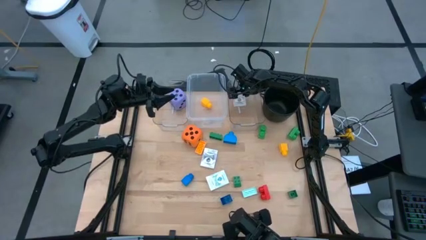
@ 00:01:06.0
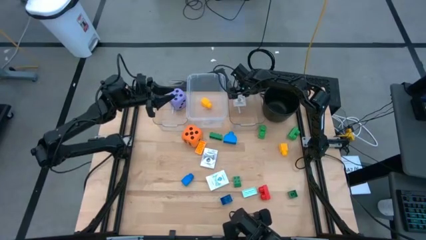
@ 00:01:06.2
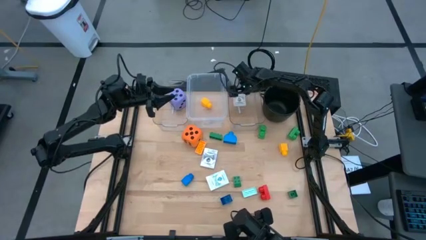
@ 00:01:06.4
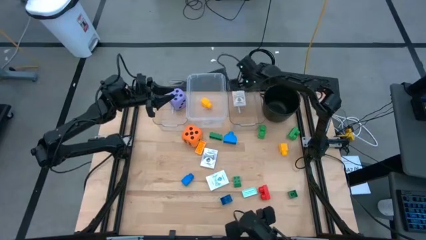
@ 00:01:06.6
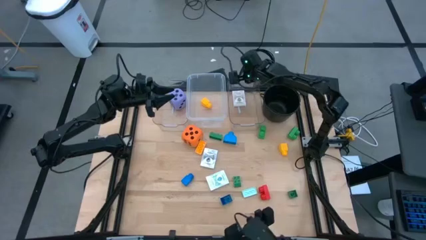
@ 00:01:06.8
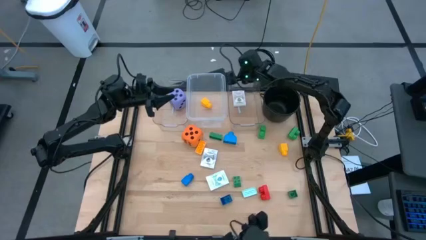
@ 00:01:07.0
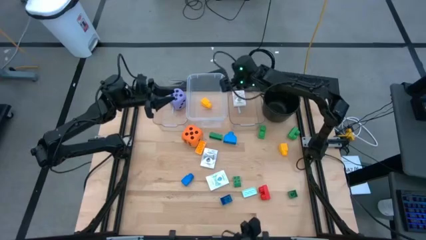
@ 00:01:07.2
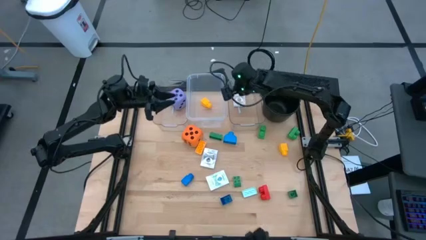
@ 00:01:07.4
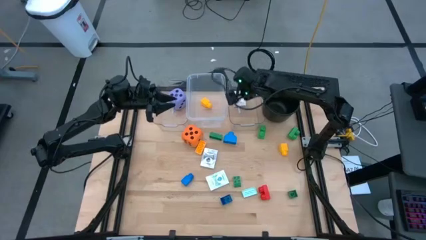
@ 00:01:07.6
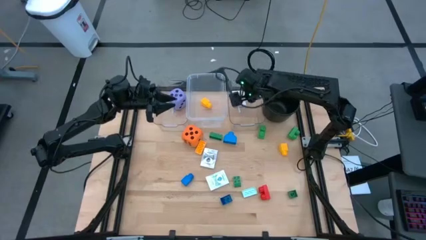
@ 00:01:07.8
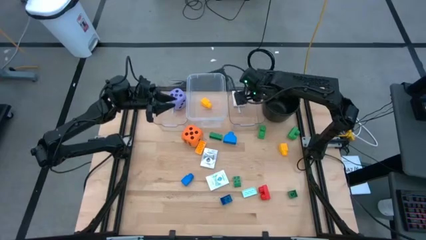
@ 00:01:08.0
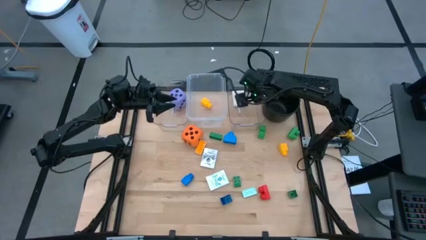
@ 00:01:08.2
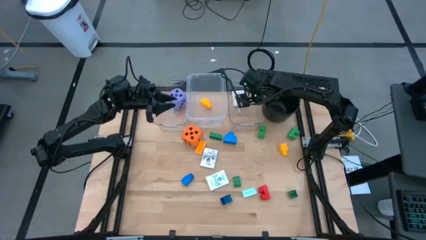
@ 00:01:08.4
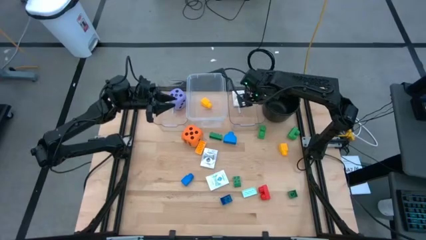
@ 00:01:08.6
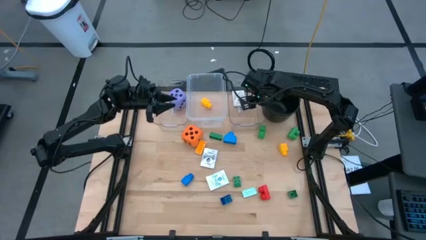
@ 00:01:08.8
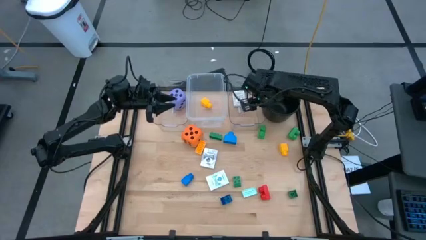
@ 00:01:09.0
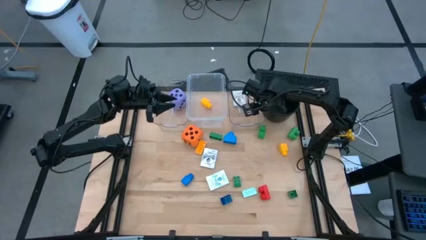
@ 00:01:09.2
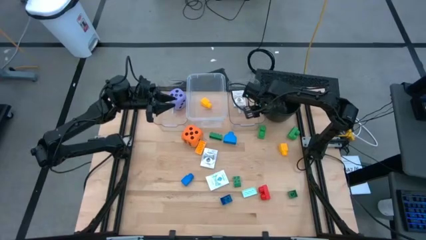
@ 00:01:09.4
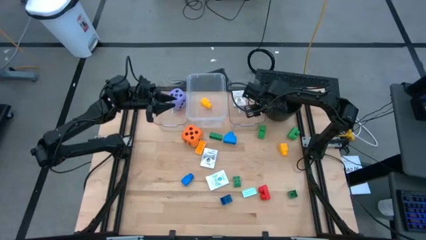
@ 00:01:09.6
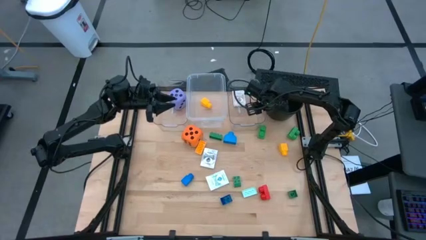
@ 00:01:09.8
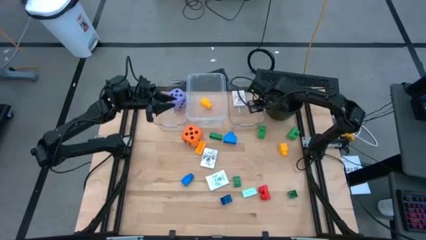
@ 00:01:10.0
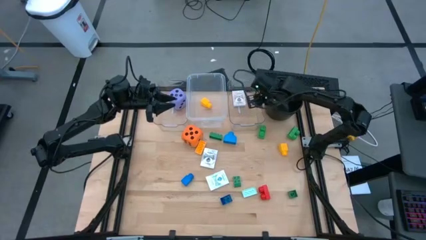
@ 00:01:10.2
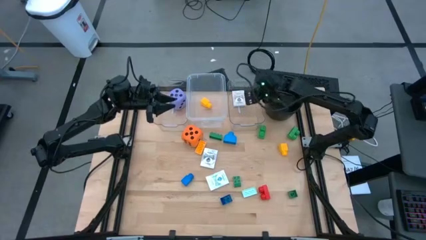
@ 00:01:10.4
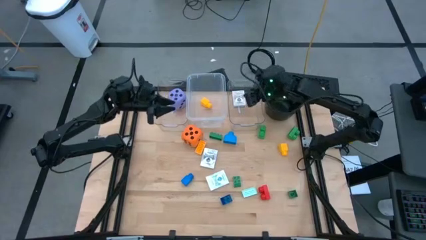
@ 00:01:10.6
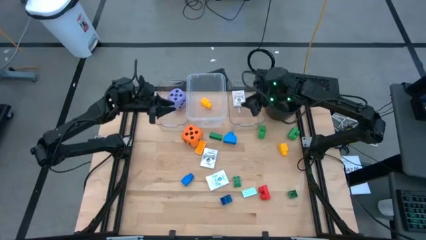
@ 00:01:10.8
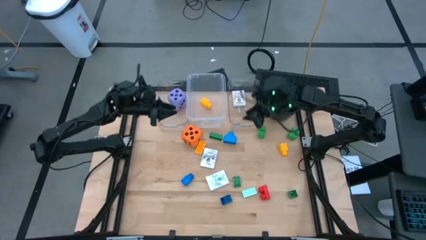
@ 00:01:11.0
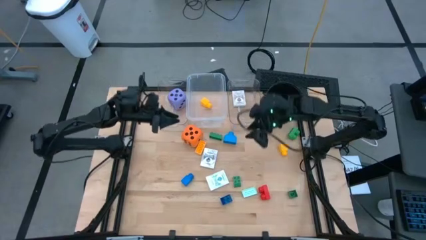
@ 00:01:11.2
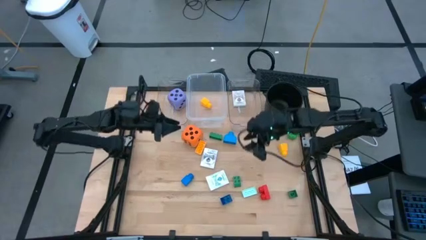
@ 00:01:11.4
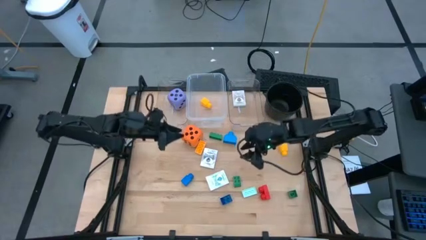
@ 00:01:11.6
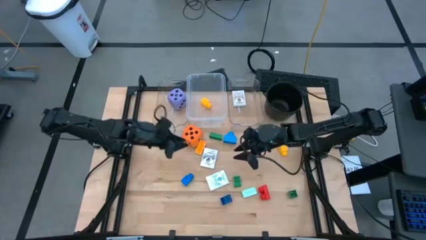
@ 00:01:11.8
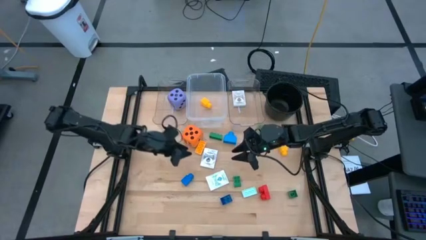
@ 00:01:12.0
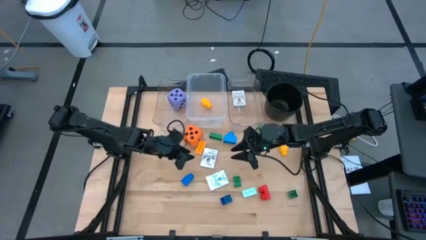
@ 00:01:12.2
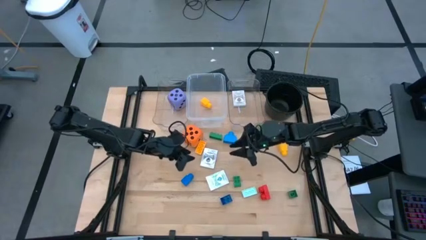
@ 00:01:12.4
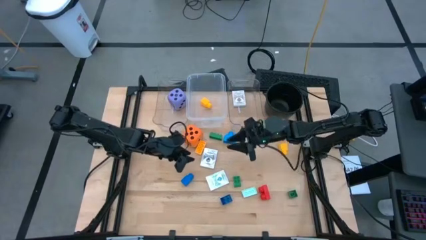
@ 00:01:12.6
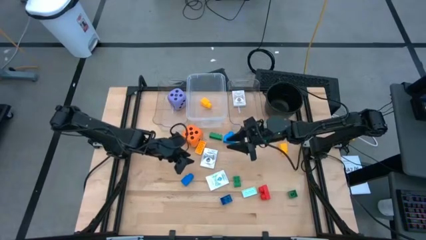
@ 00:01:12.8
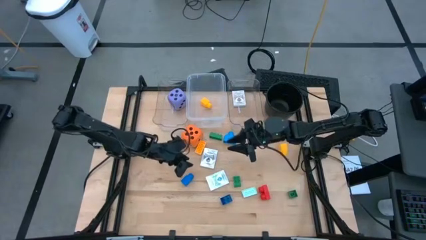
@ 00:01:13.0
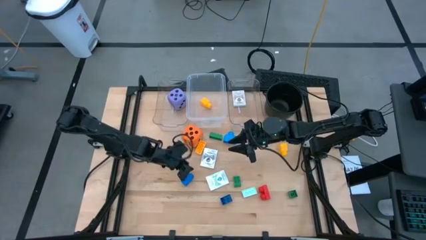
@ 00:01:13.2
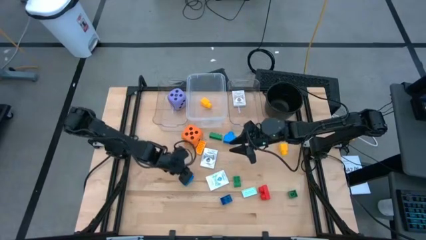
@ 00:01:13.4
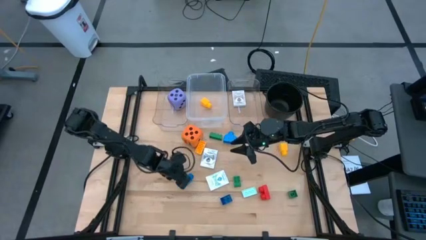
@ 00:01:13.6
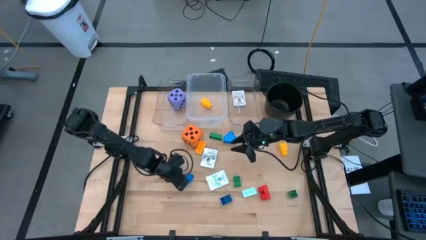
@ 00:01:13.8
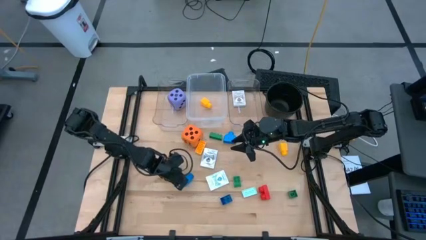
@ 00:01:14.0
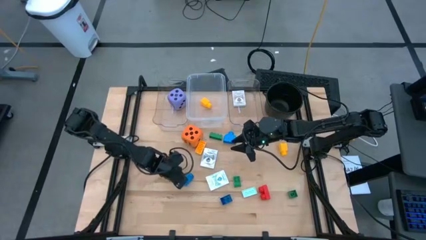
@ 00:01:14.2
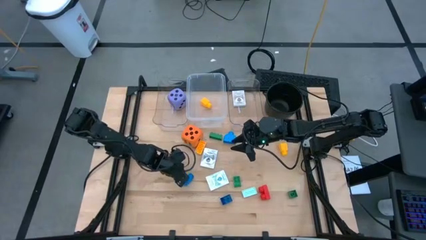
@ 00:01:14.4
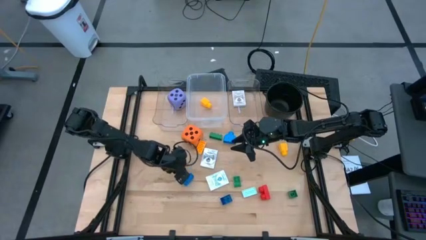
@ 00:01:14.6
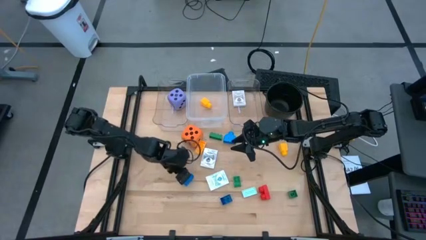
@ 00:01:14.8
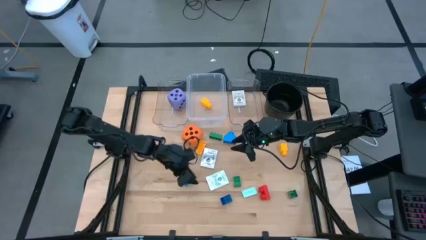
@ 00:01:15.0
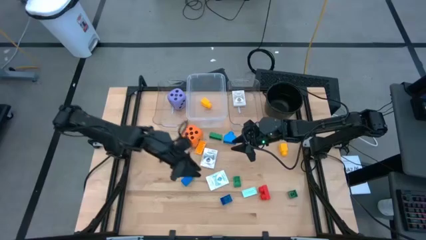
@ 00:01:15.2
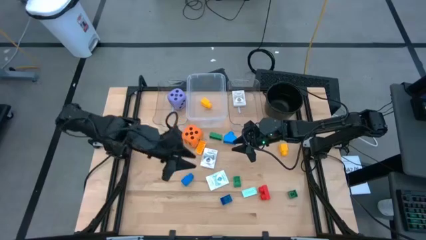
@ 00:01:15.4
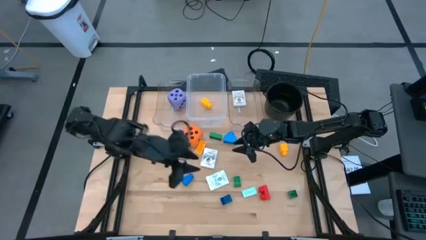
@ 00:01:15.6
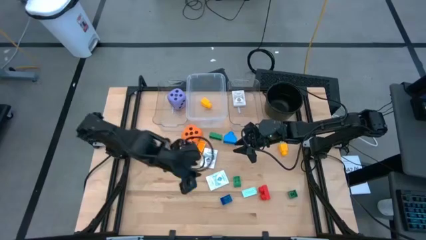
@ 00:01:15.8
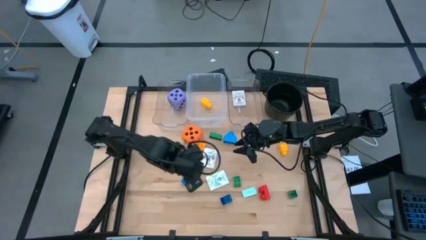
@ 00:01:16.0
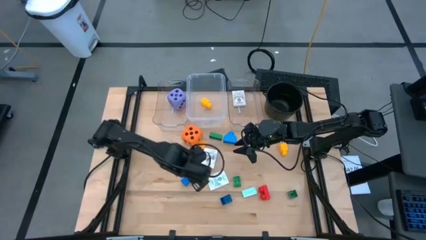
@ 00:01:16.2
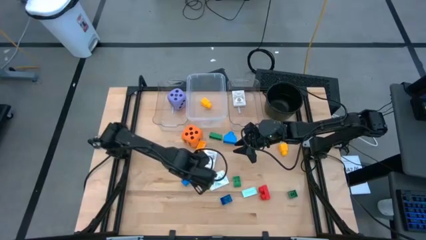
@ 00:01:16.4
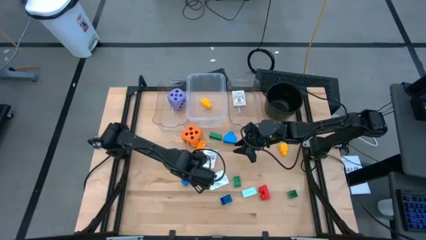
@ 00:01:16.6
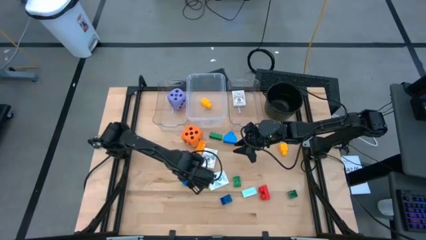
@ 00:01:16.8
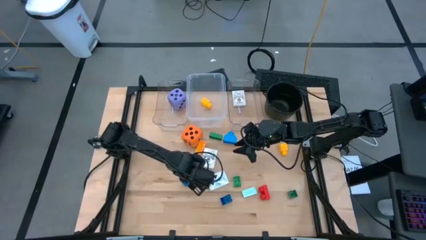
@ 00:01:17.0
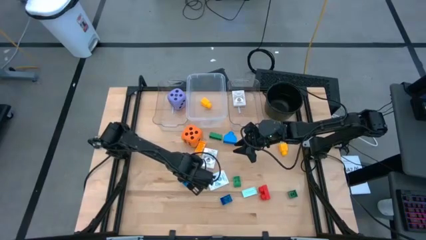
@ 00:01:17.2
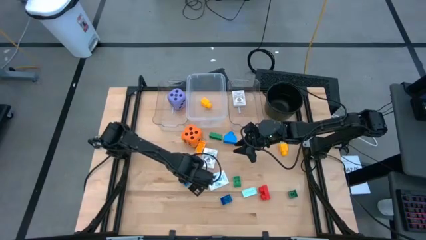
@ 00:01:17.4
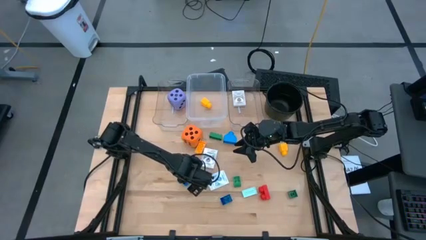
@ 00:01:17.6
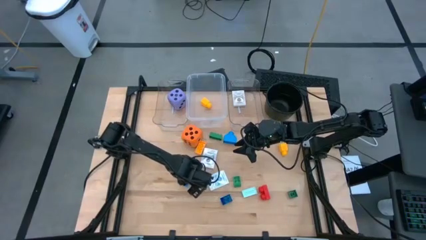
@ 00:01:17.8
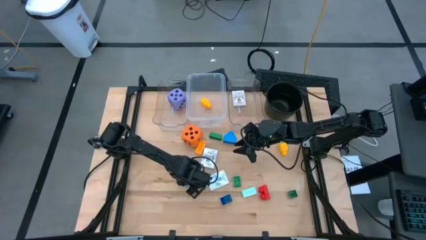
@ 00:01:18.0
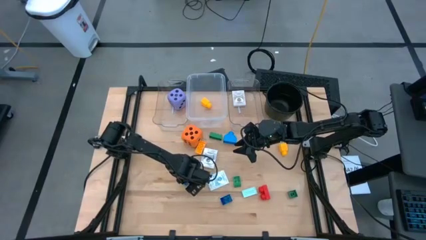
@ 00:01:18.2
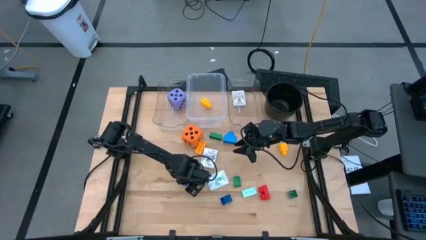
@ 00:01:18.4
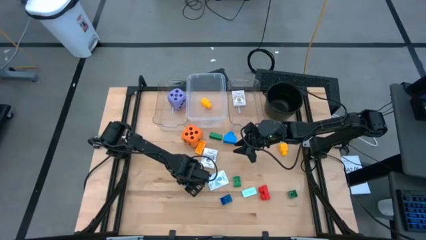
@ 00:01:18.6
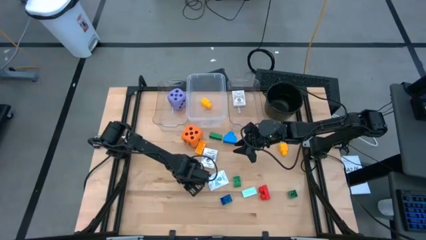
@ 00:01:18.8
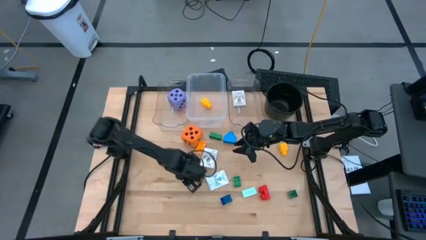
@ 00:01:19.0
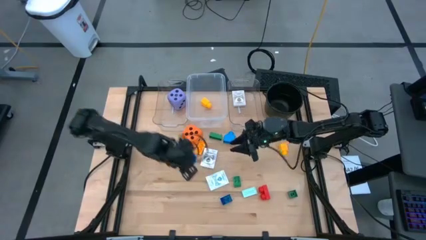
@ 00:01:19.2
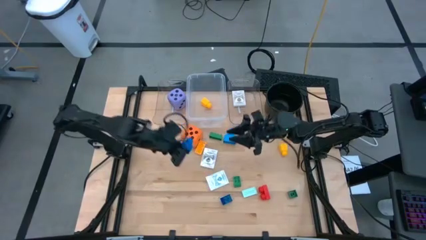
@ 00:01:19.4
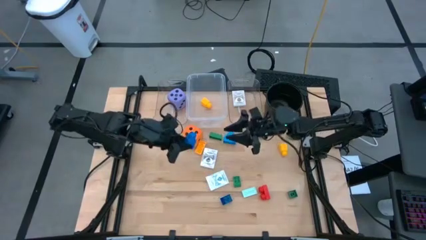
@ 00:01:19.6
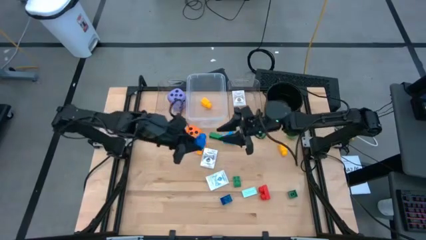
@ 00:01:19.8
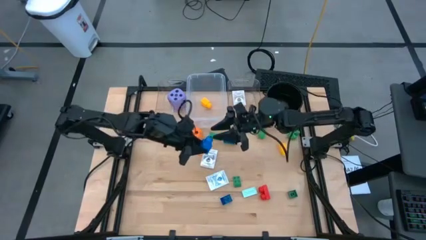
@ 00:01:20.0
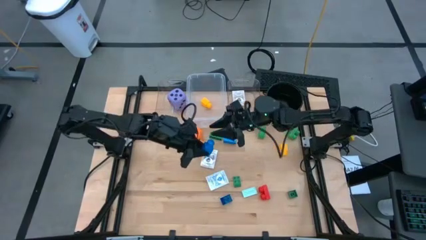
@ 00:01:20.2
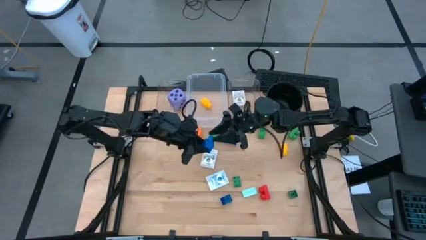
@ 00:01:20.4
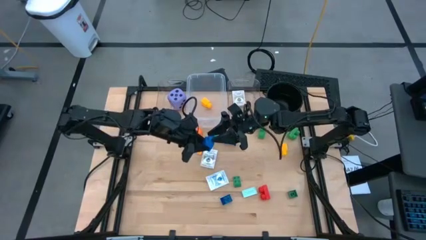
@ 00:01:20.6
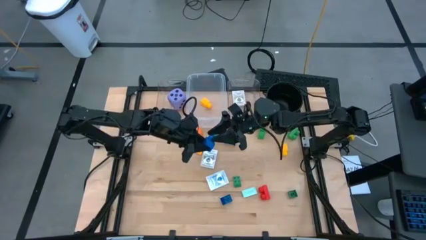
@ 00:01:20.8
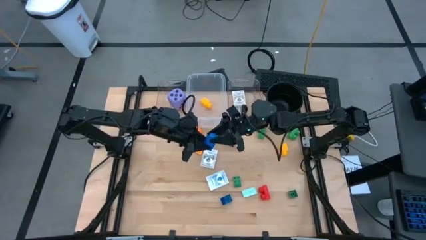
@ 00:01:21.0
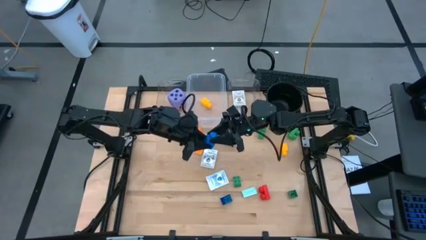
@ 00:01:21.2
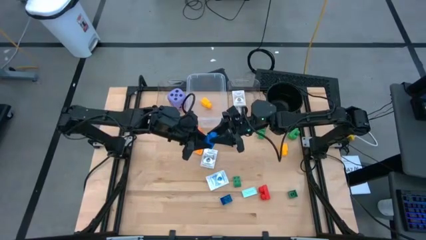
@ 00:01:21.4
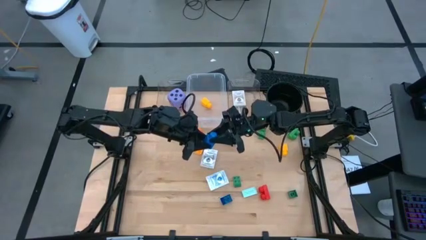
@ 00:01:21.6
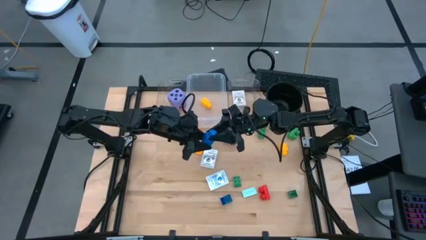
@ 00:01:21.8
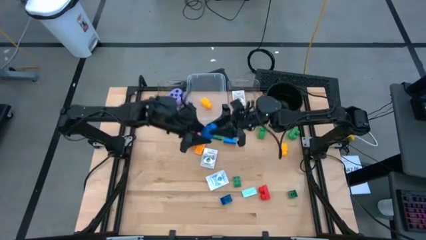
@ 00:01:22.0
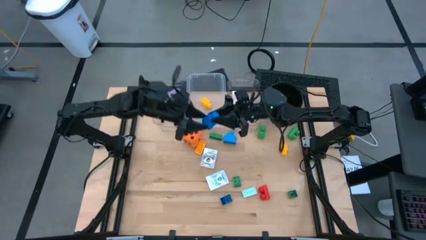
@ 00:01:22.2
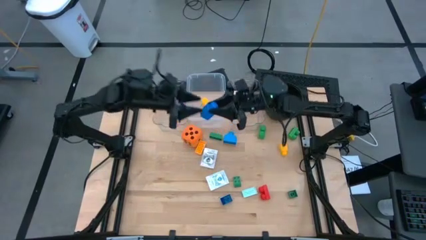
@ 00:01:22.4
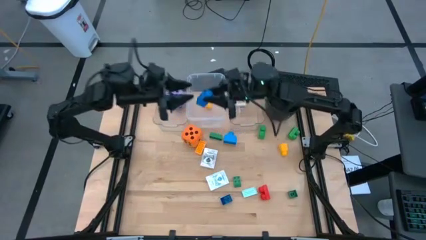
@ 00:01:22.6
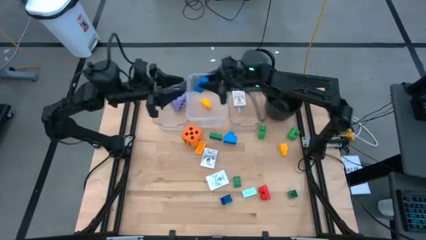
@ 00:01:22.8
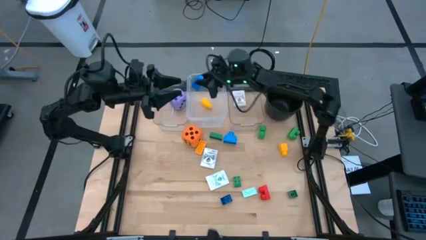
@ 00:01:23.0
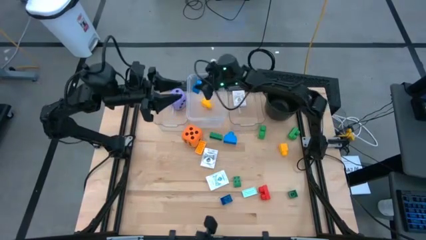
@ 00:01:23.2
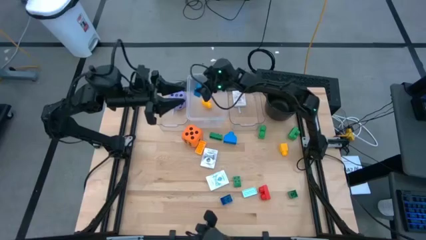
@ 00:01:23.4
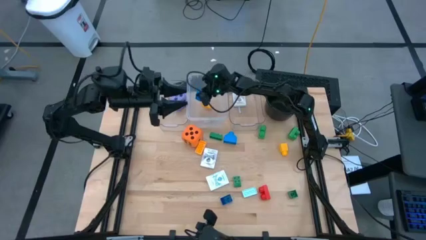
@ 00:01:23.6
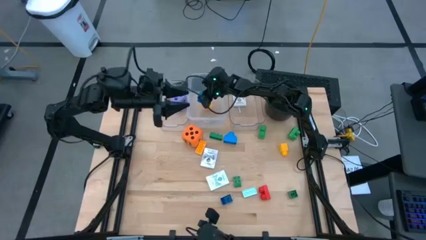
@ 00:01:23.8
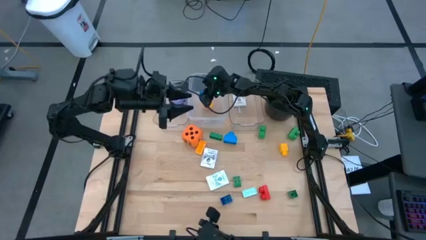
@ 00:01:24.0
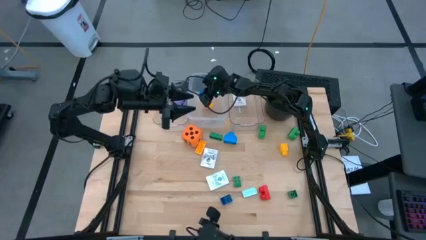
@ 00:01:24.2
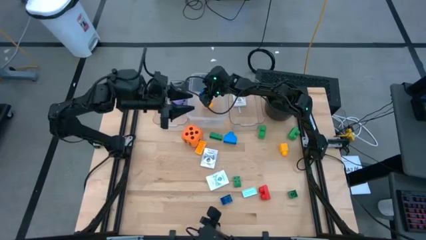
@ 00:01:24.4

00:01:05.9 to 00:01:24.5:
Task: Pick & Place Toys
Put the blue one stud game piece into the middle transparent bin
